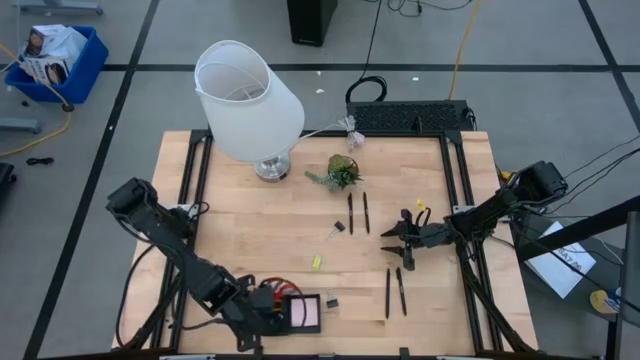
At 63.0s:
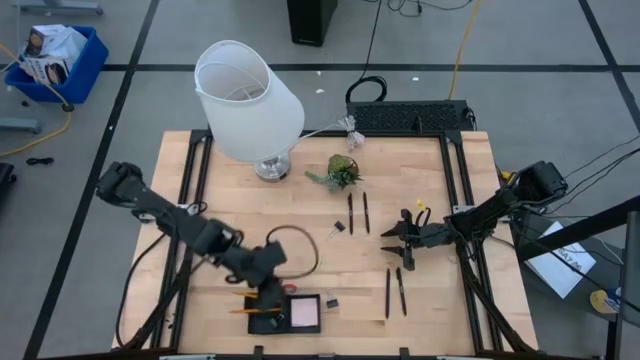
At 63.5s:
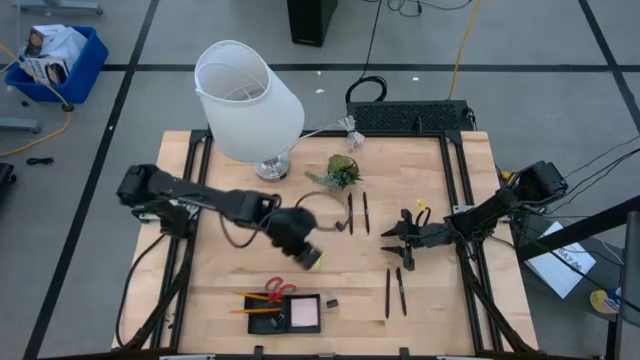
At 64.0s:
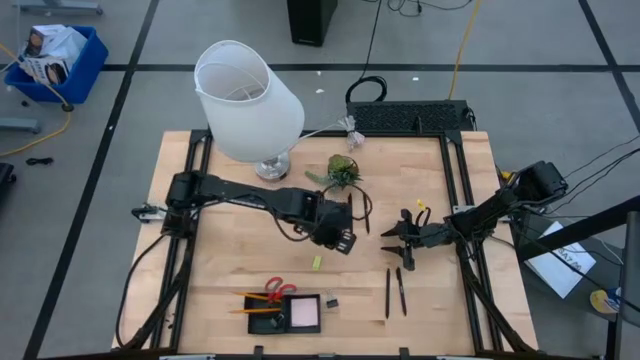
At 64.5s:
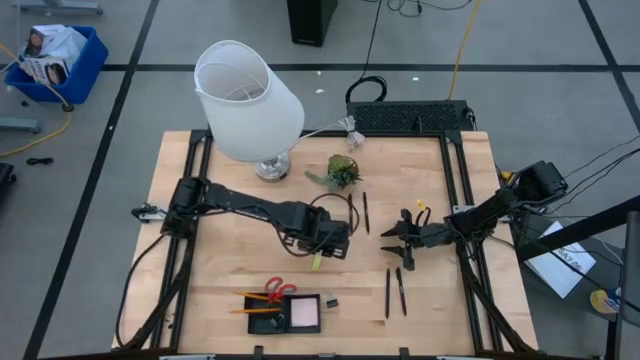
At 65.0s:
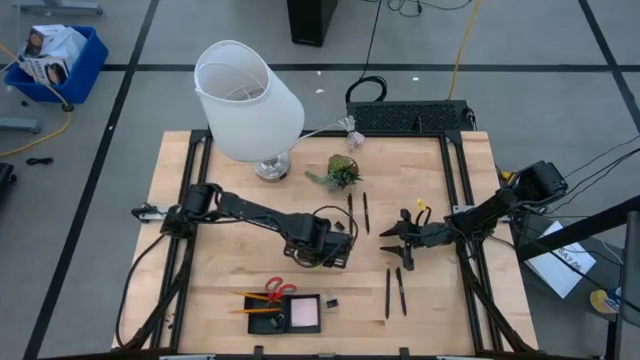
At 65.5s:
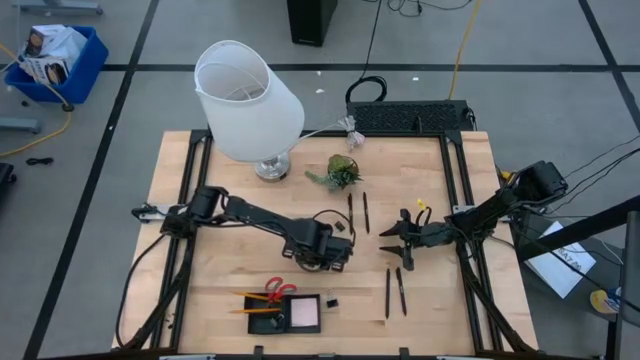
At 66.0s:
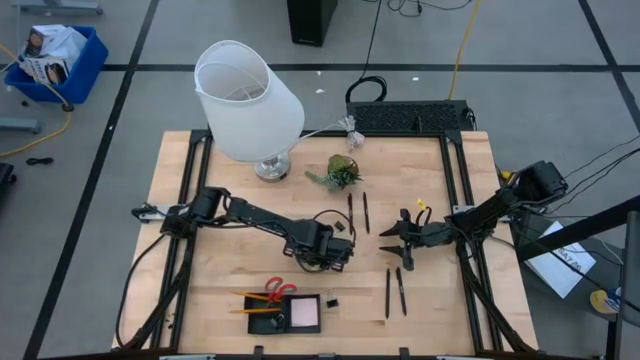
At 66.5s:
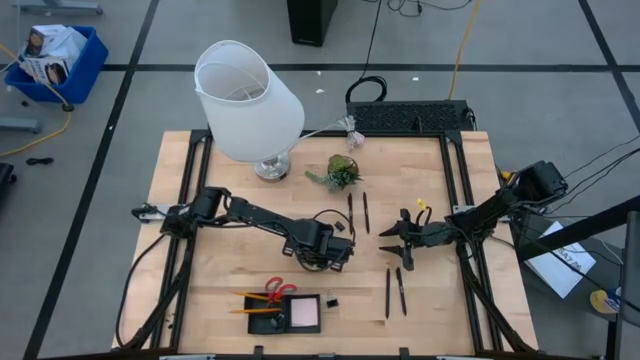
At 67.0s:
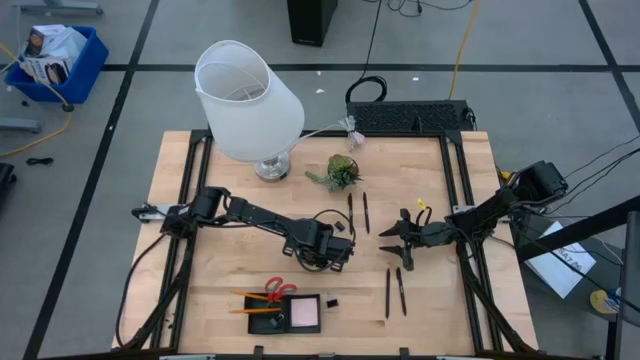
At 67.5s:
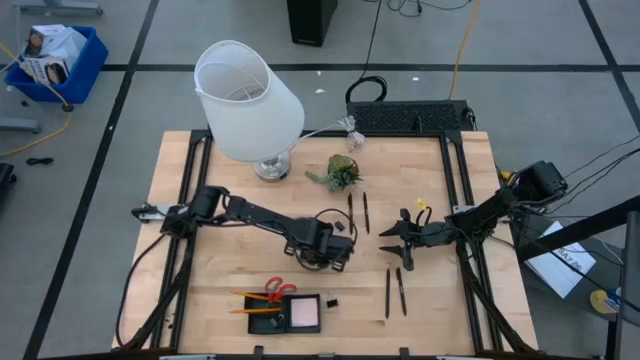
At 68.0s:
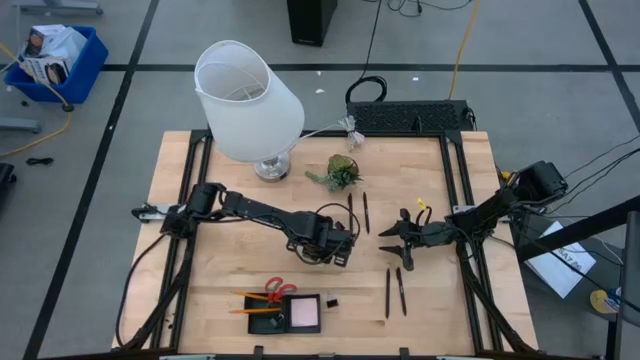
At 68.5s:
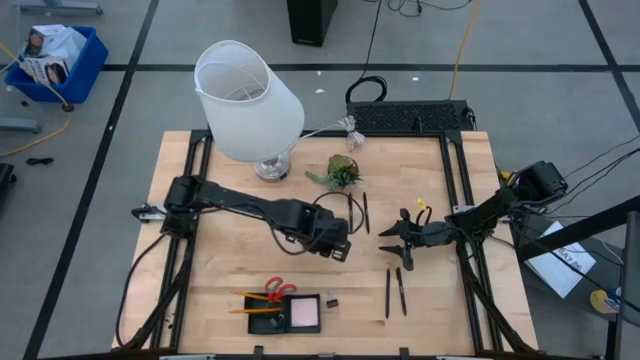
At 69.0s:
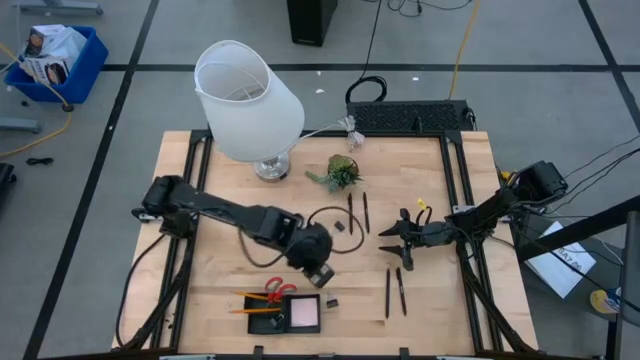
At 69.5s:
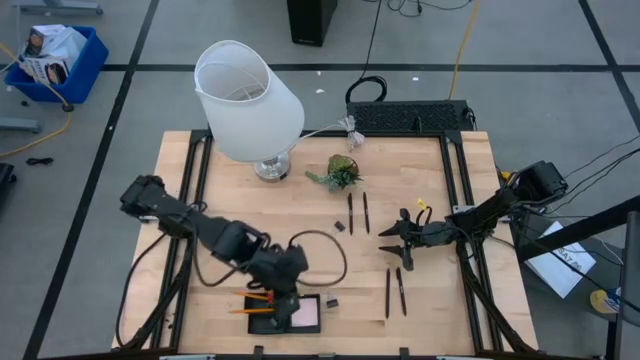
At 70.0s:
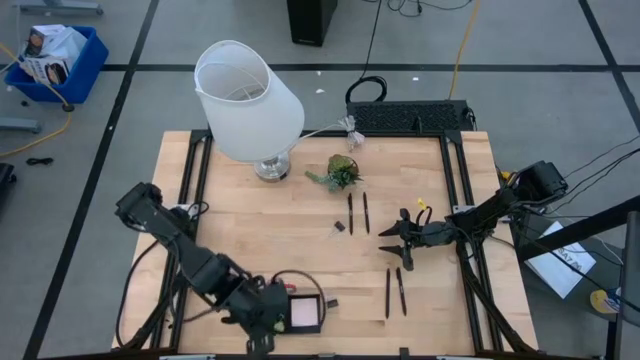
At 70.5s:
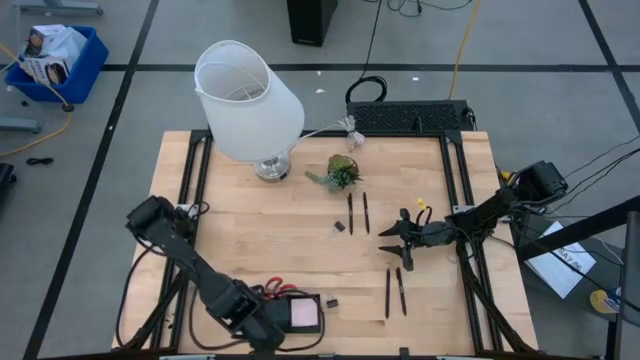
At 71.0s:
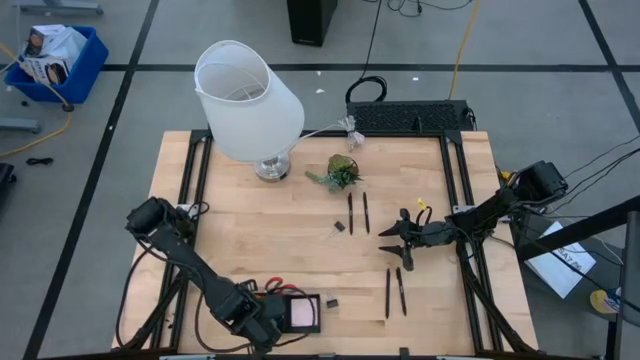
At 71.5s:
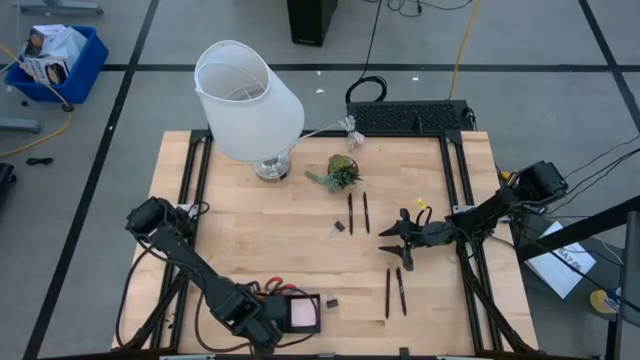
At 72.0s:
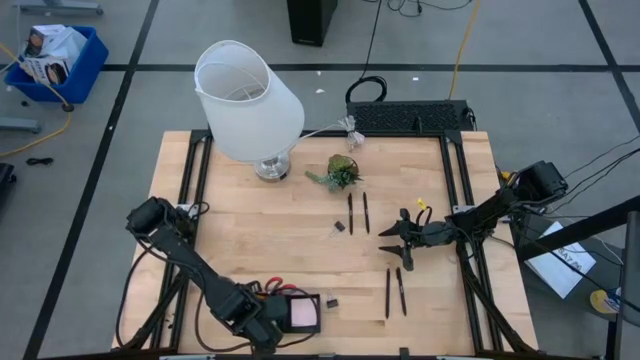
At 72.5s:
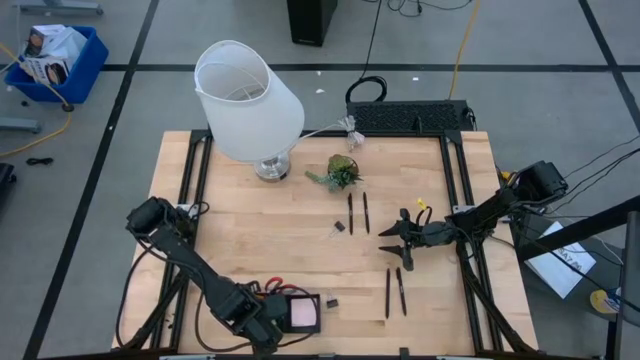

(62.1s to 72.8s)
Task: Pick and place office supplies into organizer
Put the yellow eraser into the mesh desk organizer

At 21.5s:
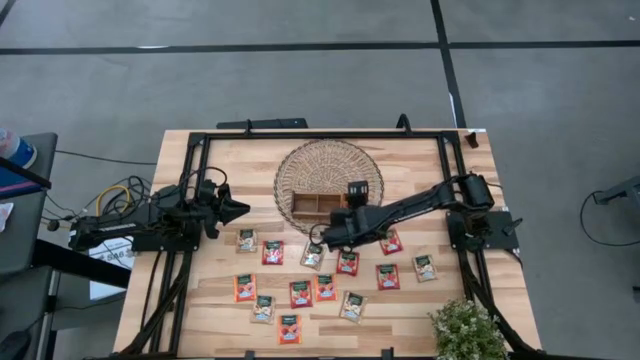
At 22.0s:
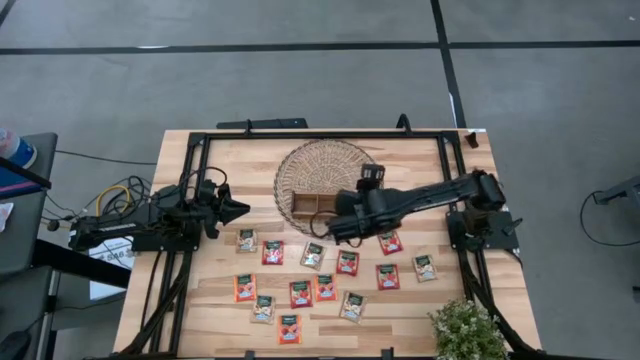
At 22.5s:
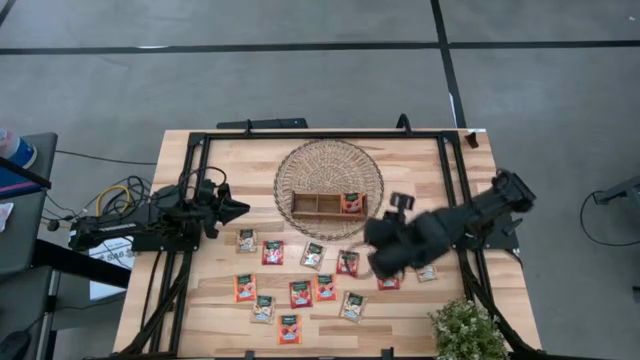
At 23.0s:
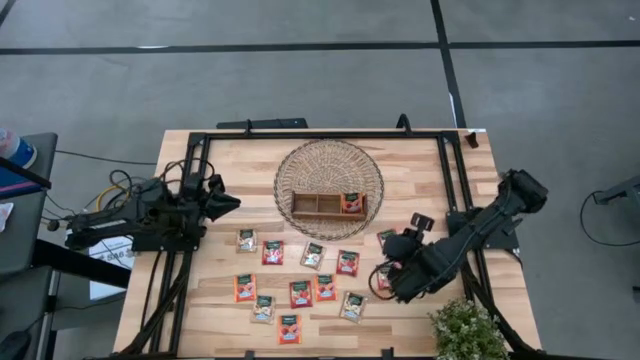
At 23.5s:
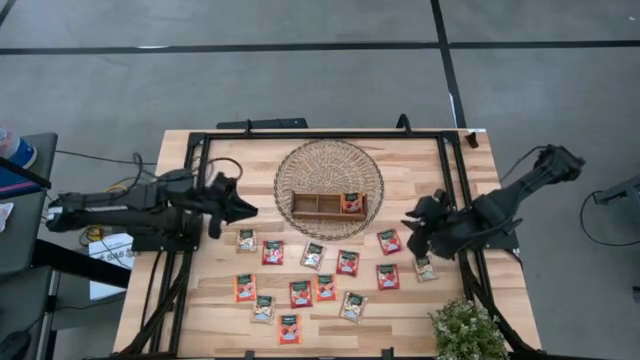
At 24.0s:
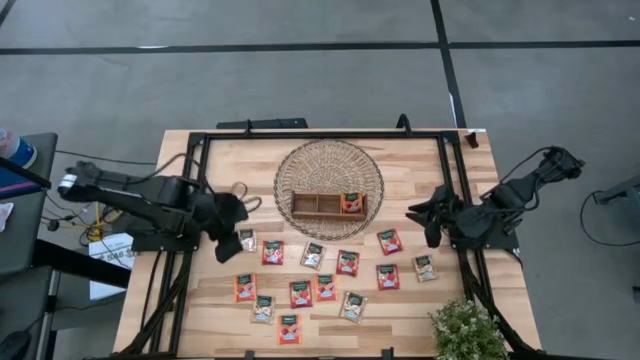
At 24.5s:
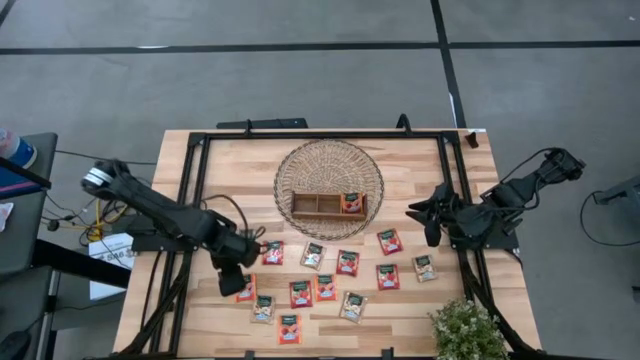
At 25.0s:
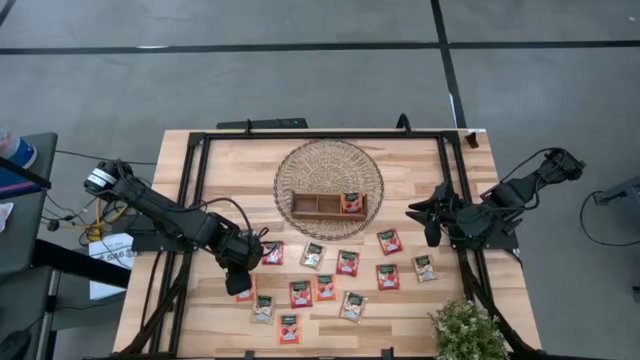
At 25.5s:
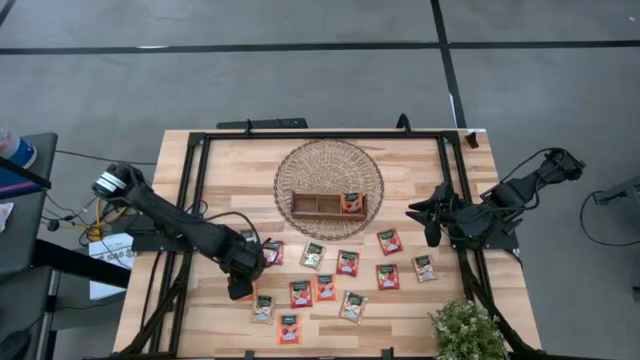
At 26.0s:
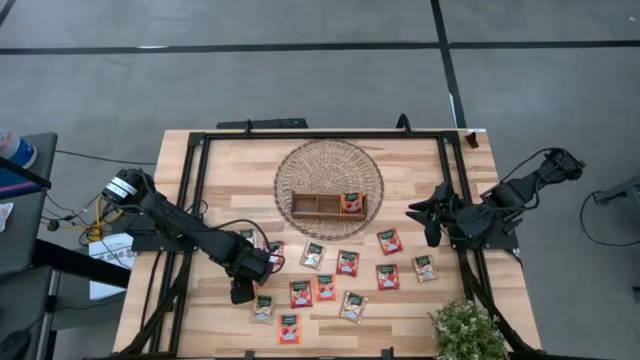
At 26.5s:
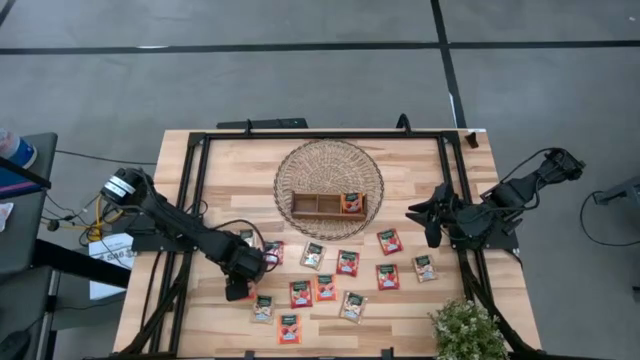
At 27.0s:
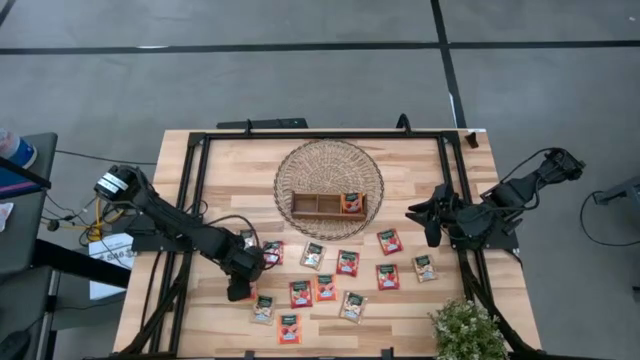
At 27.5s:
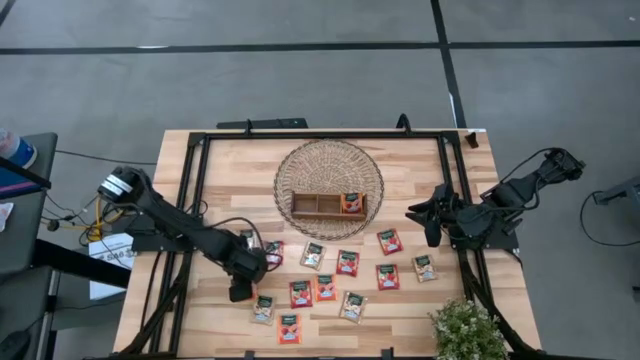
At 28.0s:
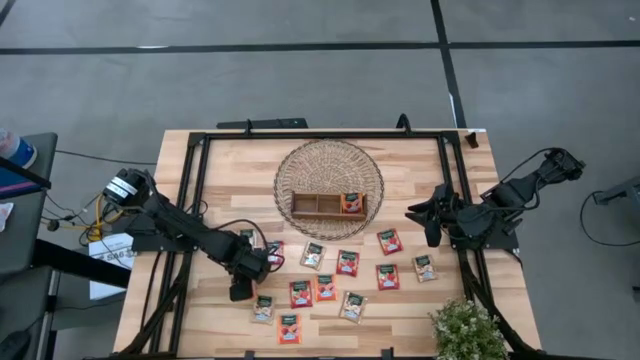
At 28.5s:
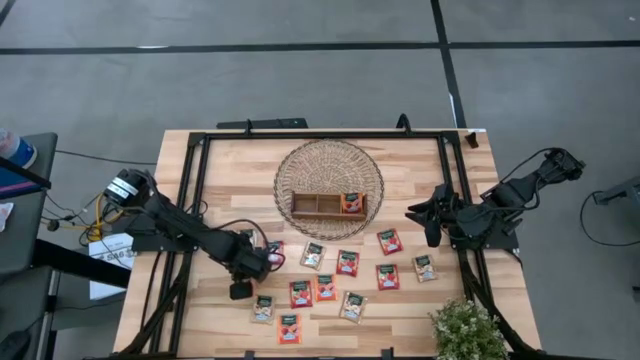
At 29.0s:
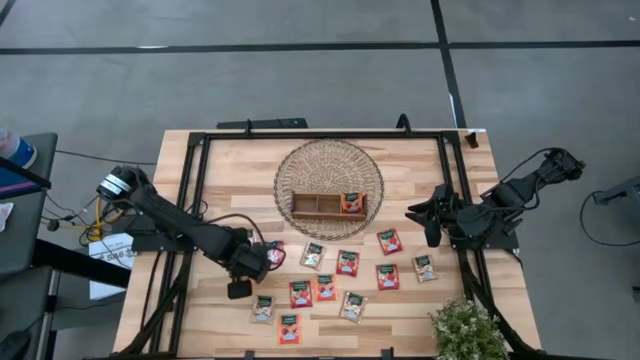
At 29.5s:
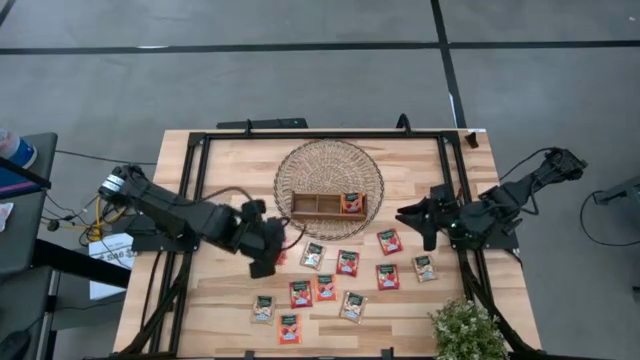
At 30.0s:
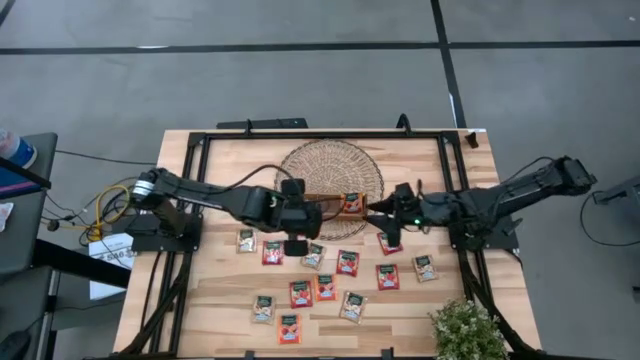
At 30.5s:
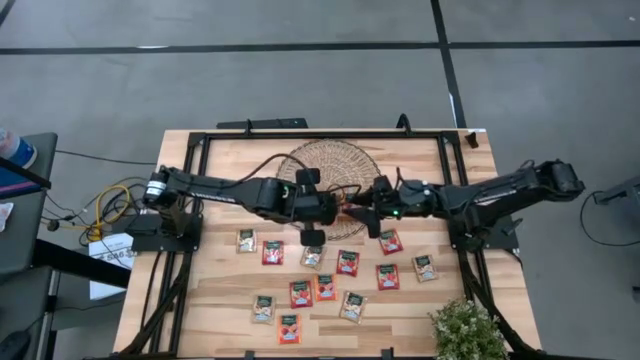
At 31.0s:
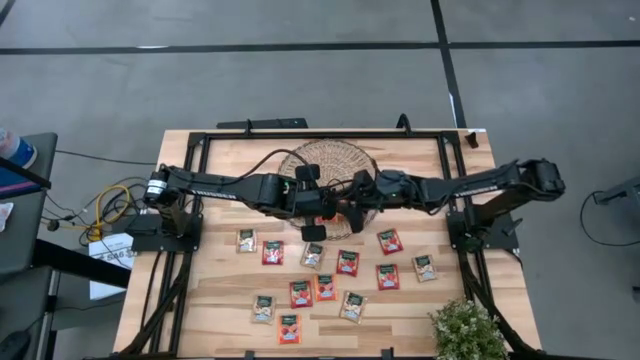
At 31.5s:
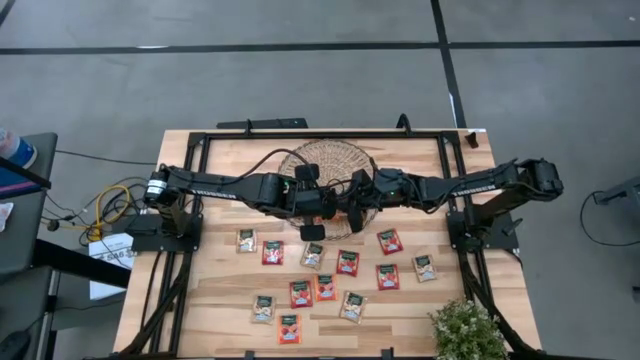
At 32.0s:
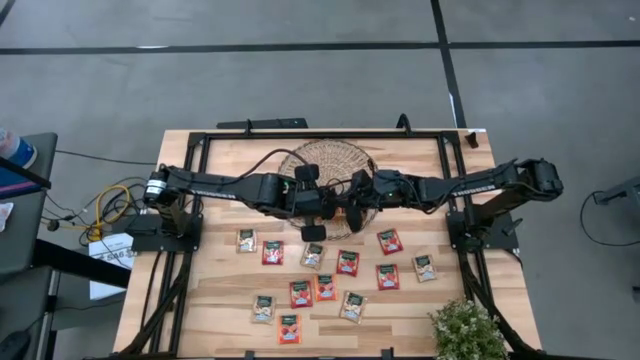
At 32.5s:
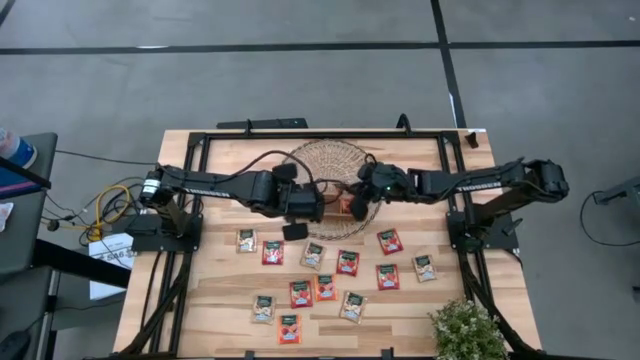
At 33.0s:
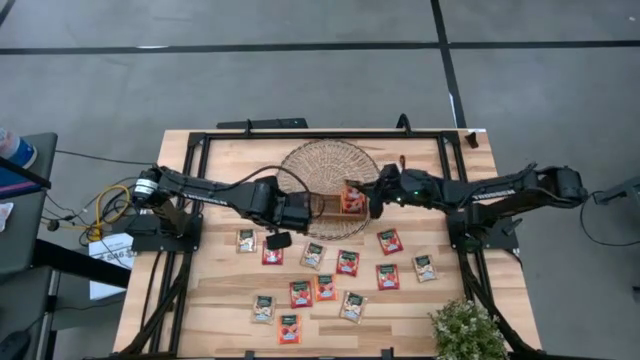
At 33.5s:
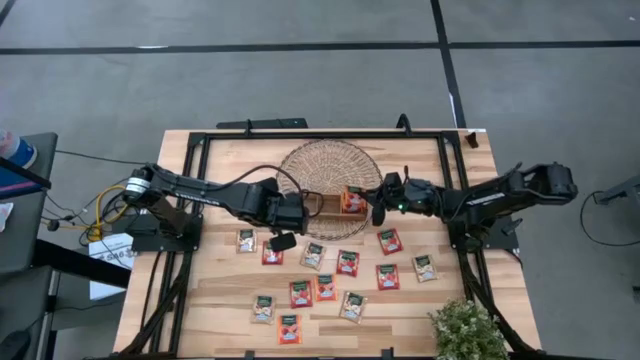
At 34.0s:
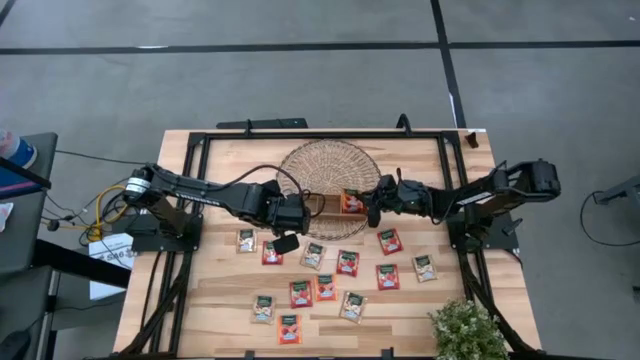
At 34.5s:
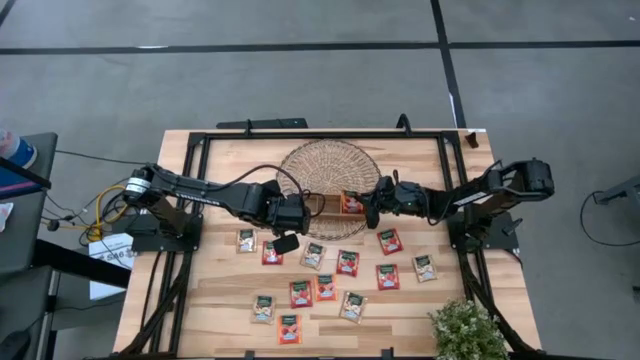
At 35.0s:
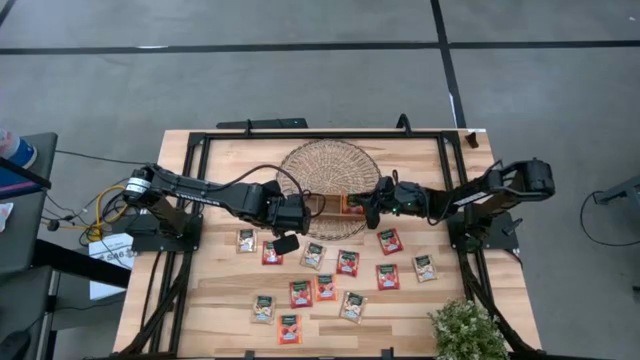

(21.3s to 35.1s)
Task: Pick & Place Tea
Put the orange tea bag into the right section of the wooden organizer
